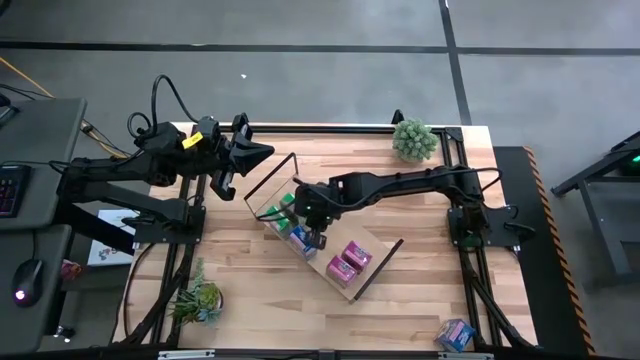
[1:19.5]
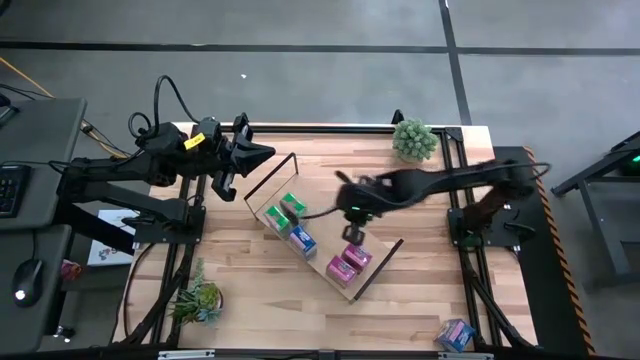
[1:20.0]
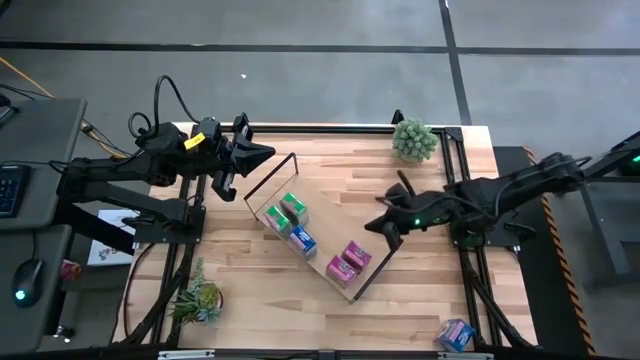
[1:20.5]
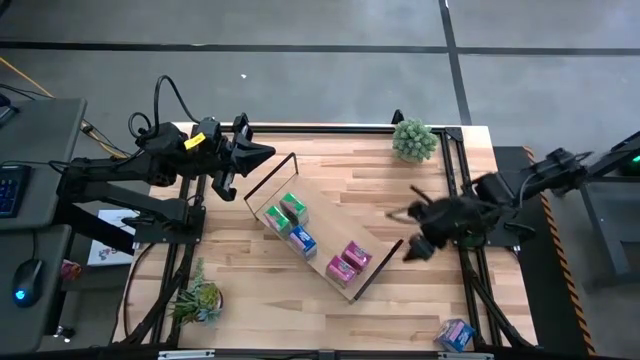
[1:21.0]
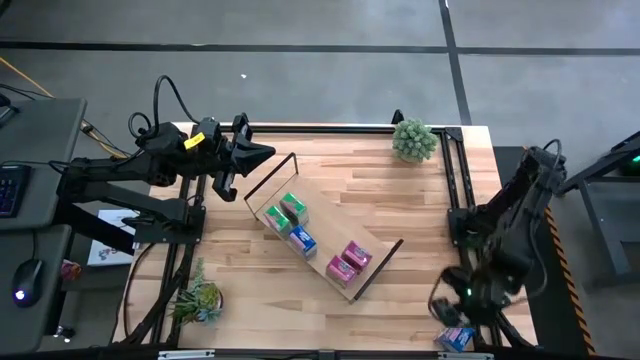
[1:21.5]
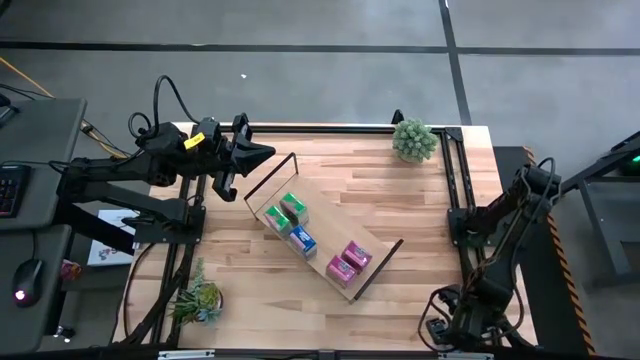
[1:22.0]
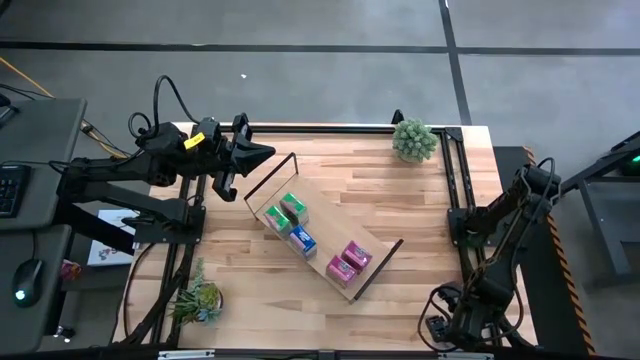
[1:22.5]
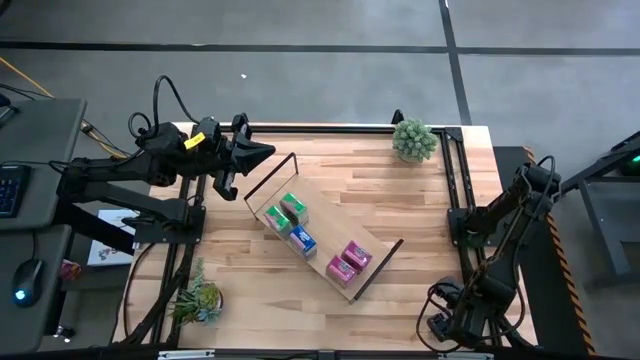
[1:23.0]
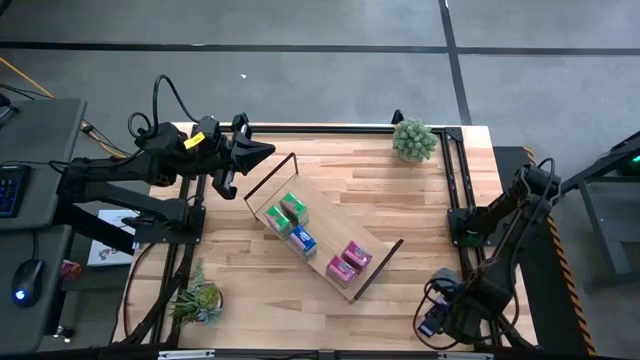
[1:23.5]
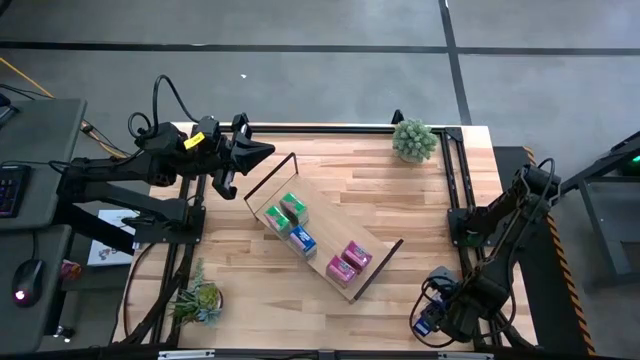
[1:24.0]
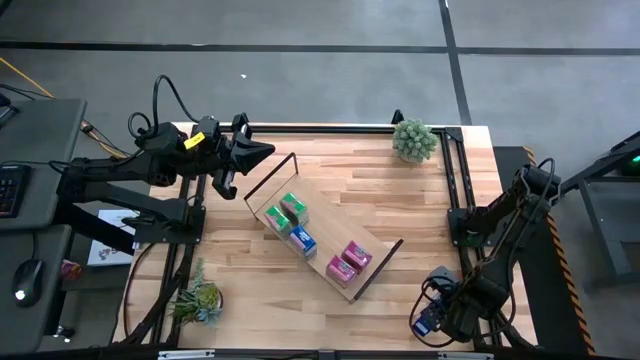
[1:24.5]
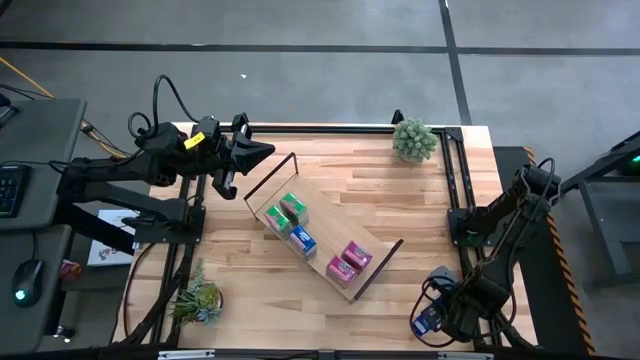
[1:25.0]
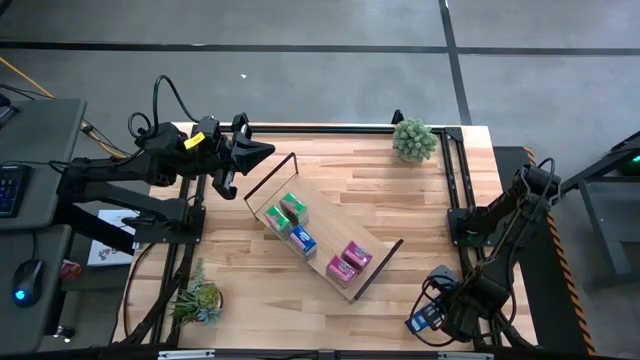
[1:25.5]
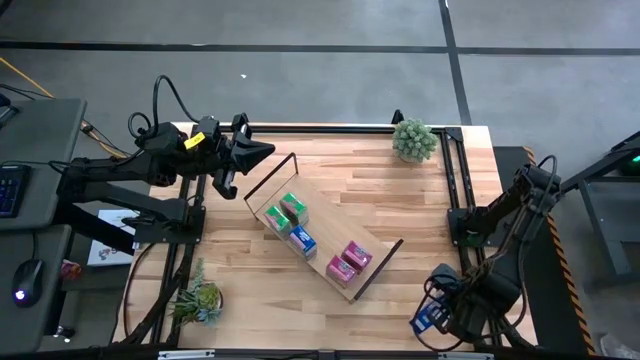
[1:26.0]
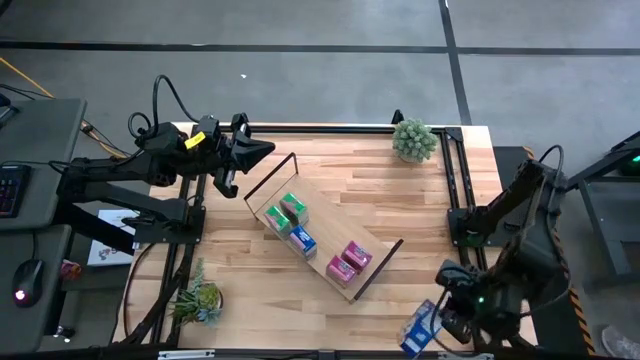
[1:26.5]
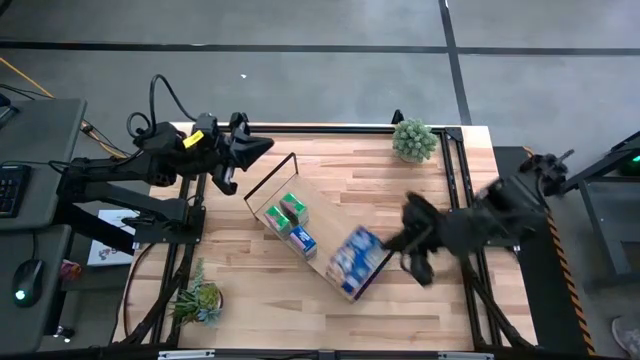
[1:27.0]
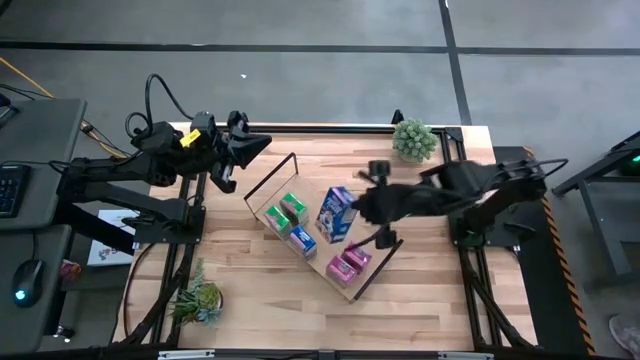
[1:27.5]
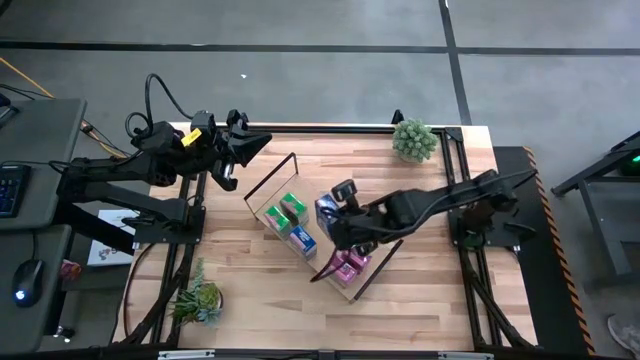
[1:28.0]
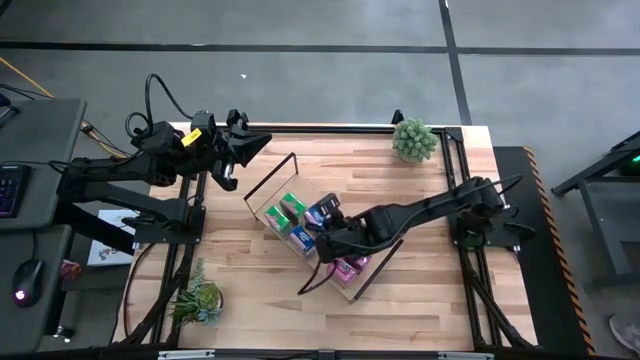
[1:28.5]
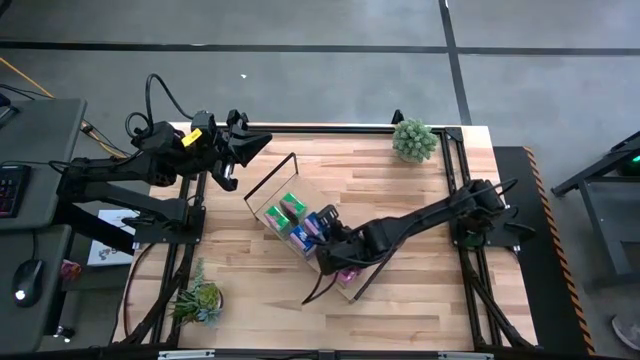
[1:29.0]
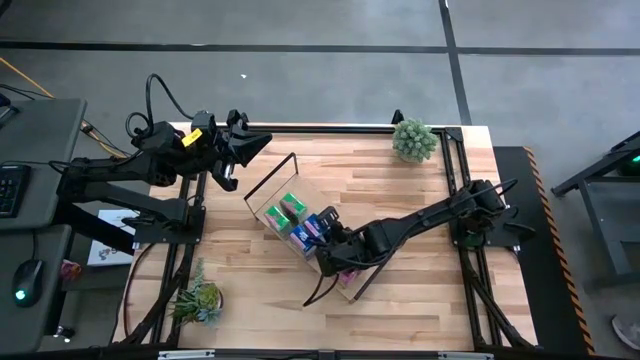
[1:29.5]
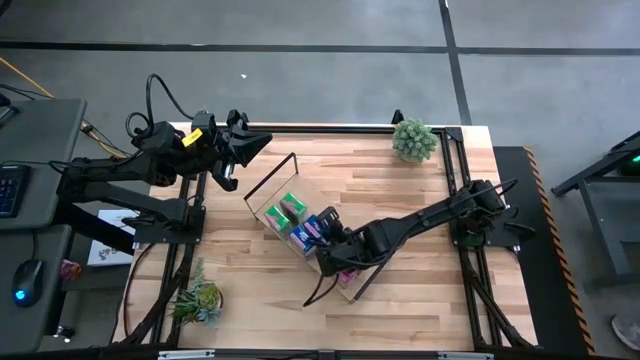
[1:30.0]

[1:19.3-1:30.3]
Task: Stack cereal on shelf
Put the blue cereal box on the shelf aligned with the other blue cereal box

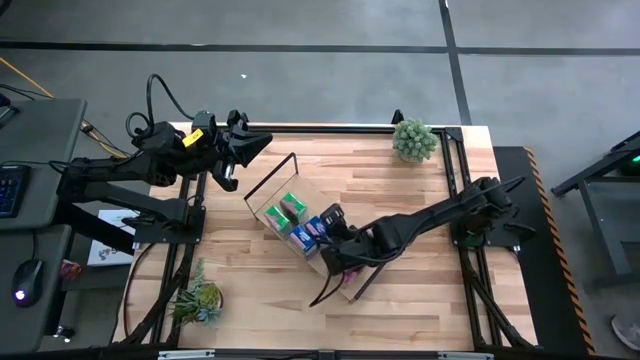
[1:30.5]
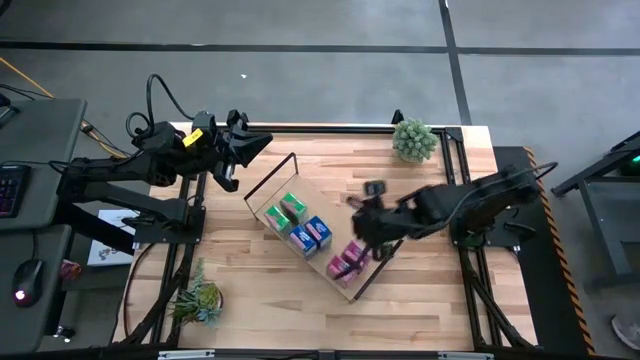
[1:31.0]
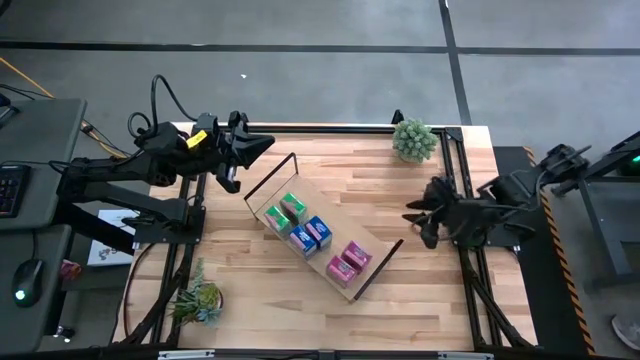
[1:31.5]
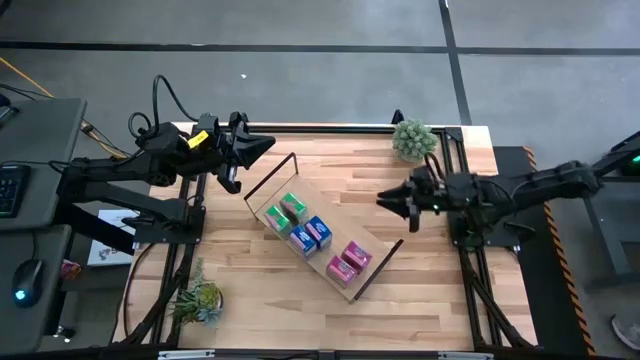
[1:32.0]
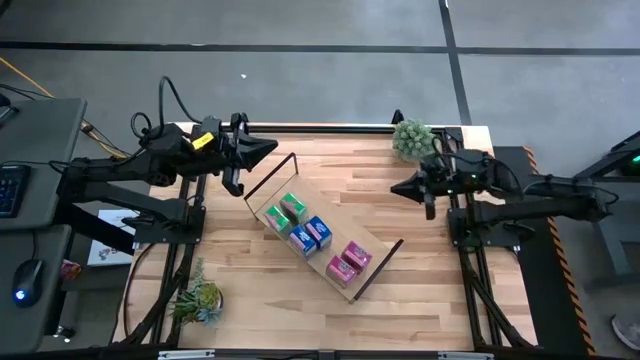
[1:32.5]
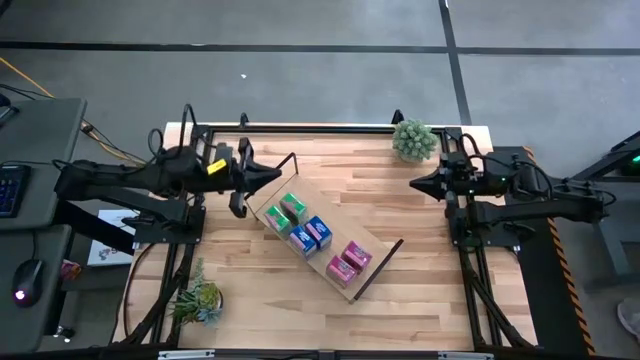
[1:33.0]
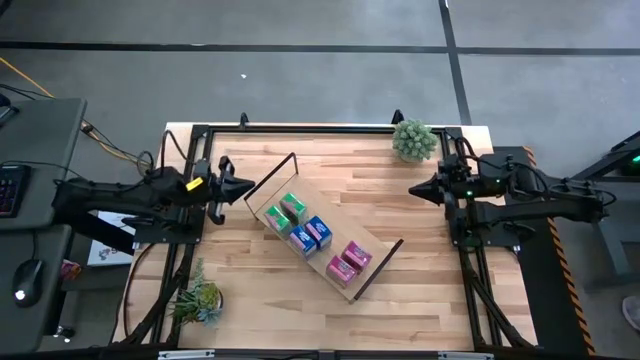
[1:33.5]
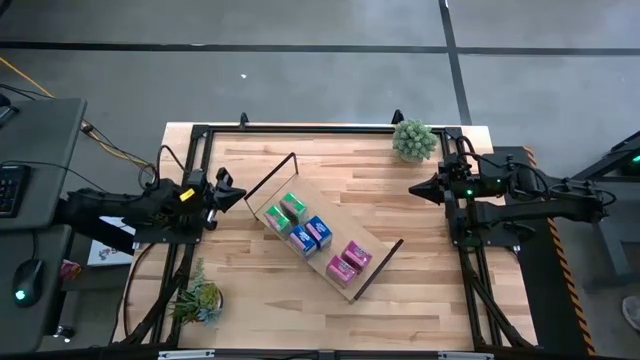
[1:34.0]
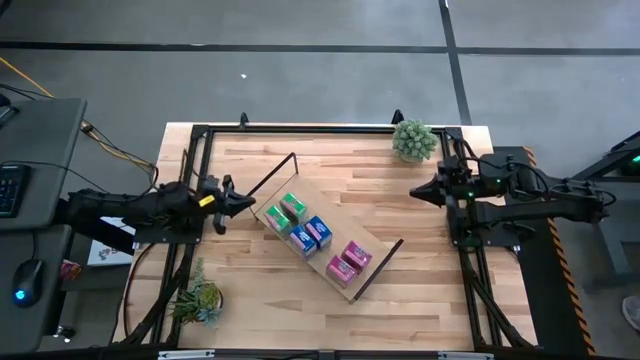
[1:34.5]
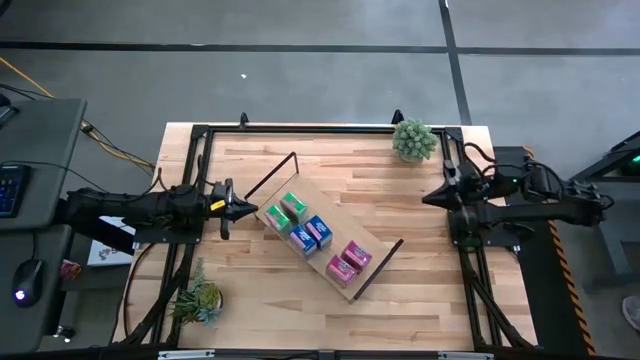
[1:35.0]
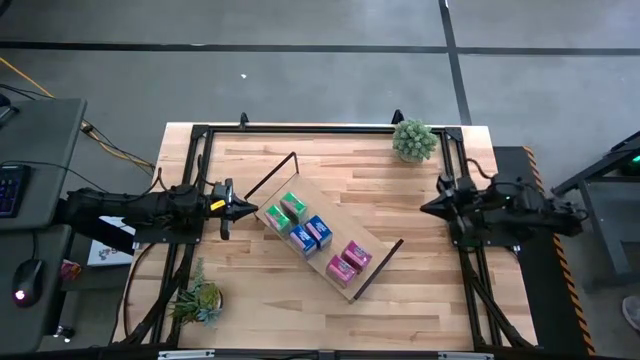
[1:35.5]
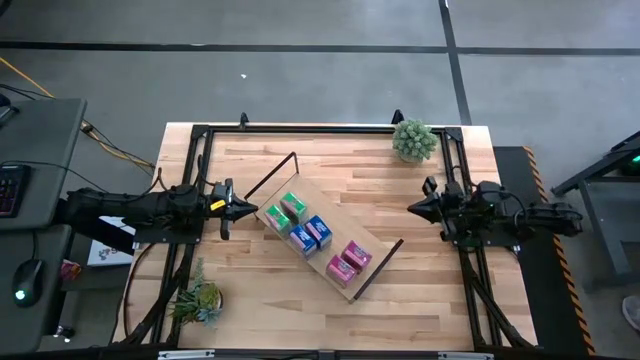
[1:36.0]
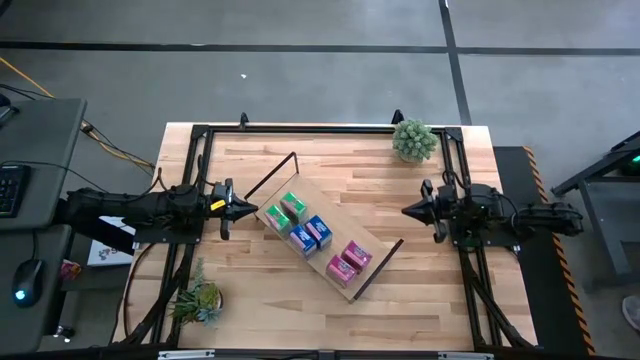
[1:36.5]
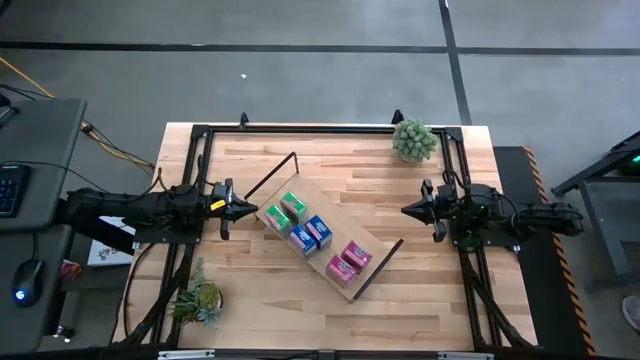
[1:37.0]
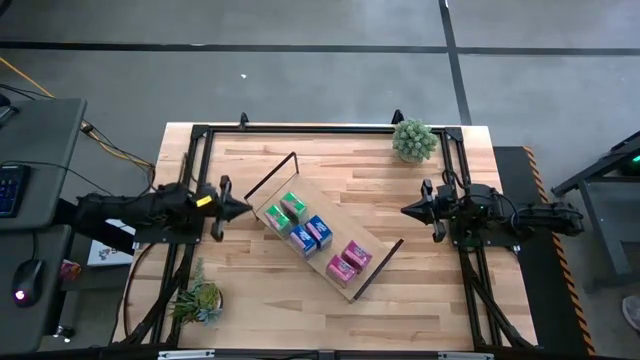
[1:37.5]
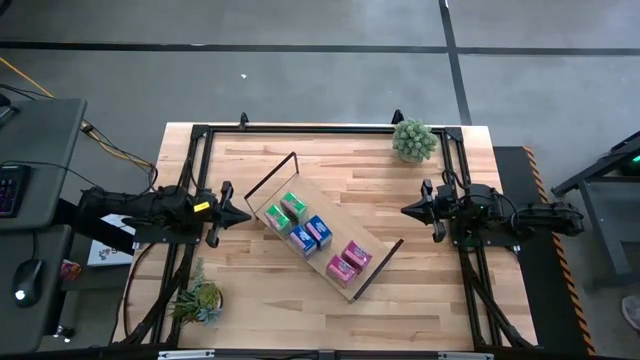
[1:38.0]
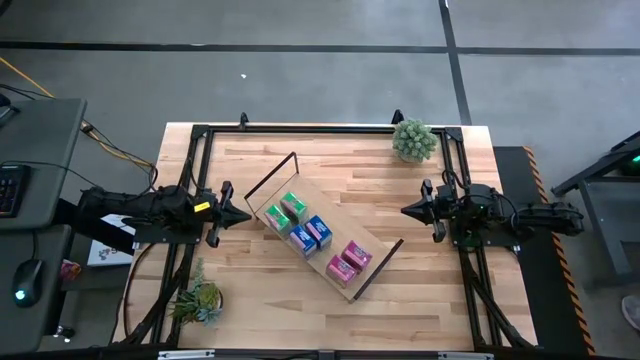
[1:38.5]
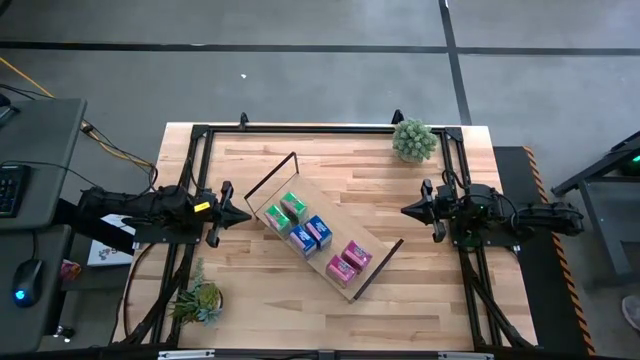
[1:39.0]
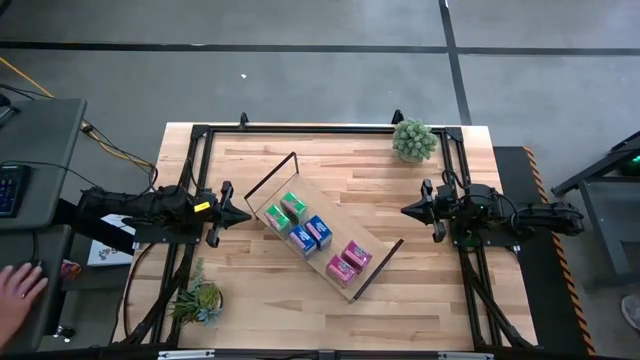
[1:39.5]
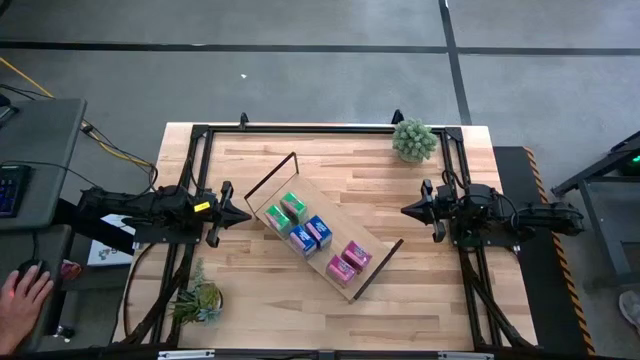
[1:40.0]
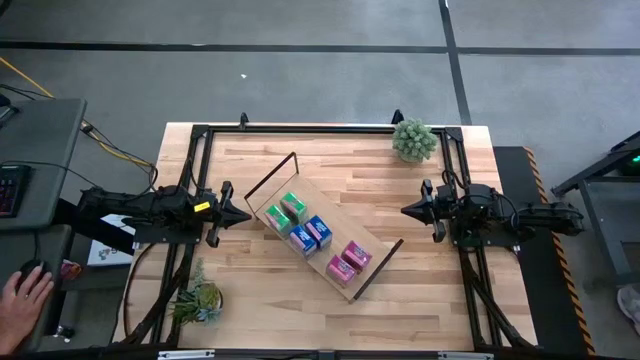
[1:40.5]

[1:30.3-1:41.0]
Return to Home Position
